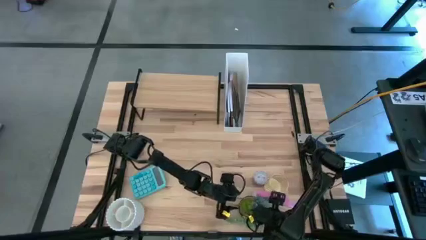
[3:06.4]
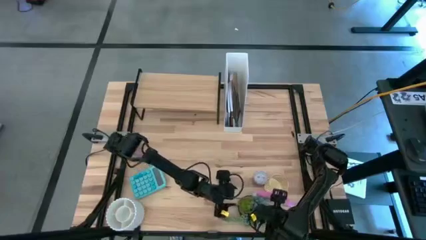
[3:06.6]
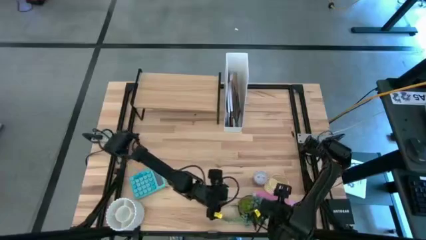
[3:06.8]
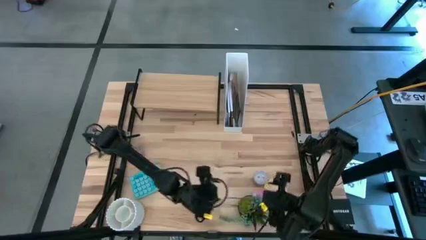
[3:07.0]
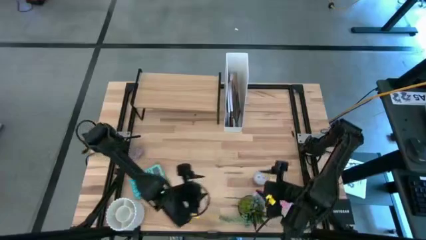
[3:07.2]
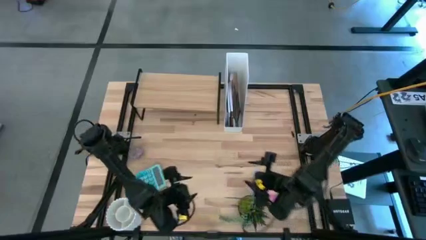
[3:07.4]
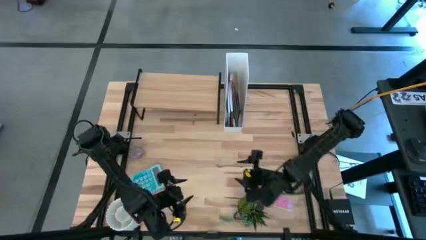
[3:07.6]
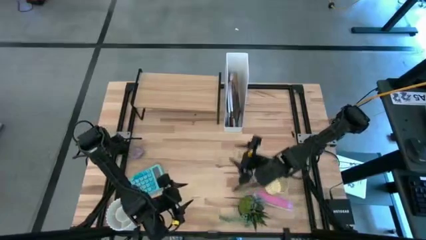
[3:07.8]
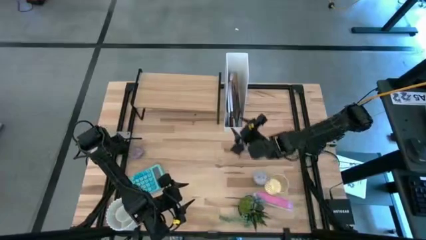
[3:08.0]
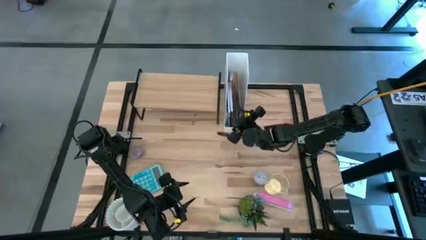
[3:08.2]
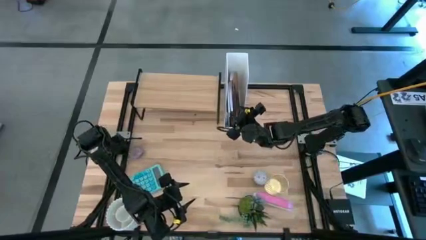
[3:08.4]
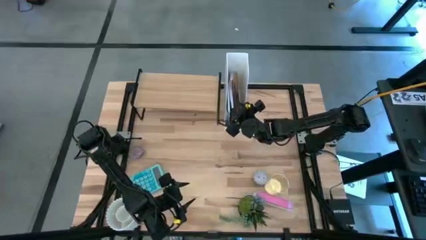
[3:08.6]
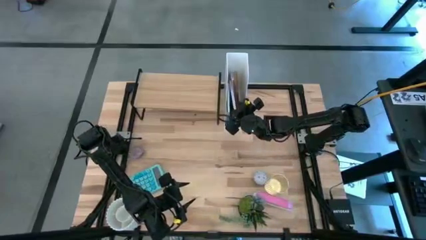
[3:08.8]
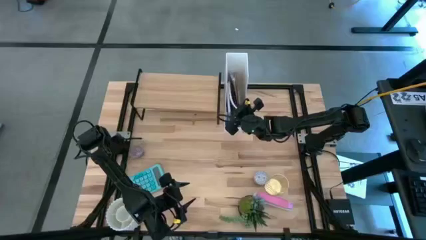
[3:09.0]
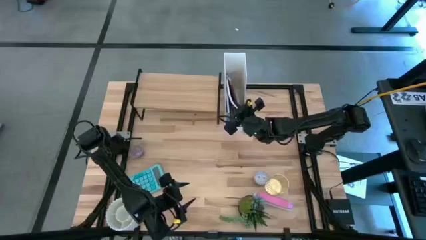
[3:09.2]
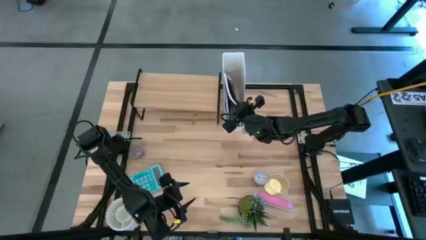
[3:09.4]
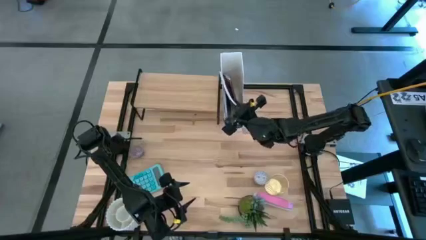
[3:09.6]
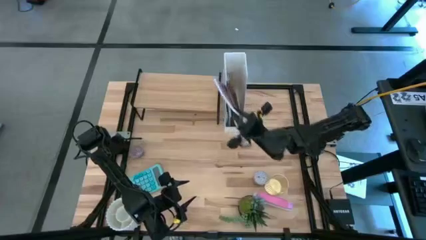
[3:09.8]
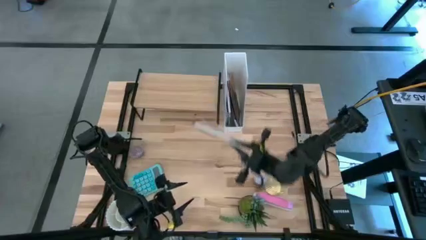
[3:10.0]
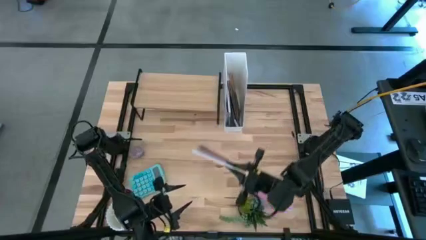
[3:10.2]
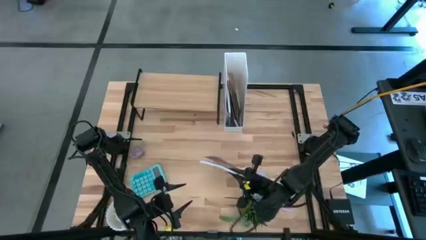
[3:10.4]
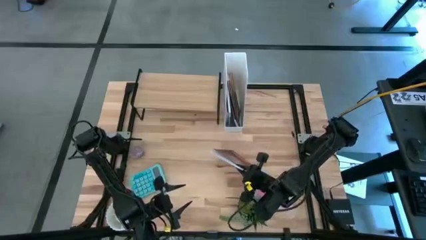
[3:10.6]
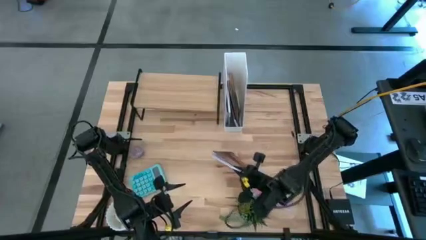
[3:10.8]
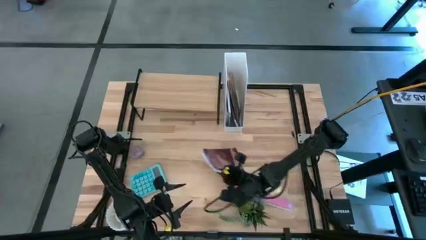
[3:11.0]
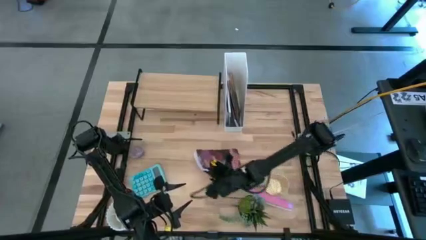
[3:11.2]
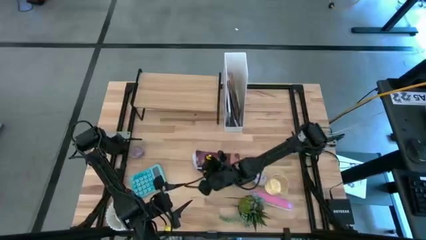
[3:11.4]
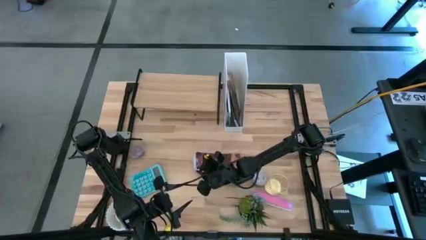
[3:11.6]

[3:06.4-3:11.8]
Task: Stock shelves
Remove the red book from the book organizer

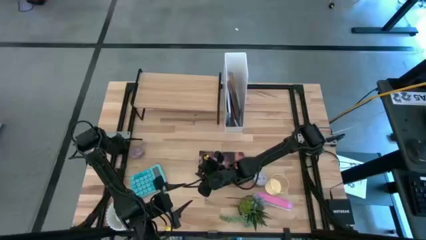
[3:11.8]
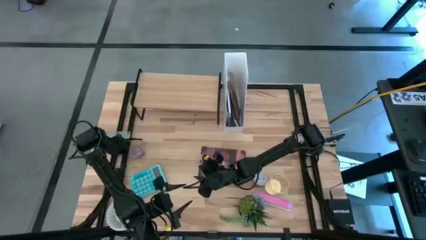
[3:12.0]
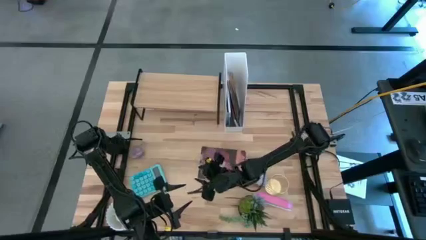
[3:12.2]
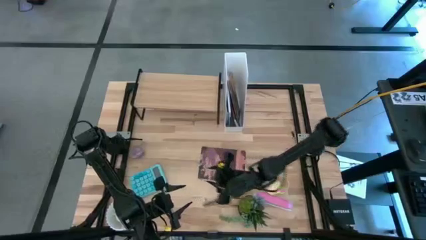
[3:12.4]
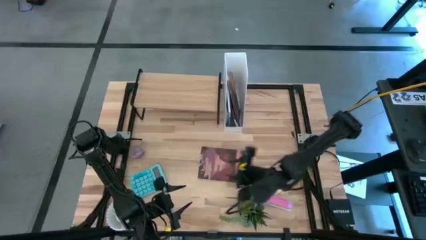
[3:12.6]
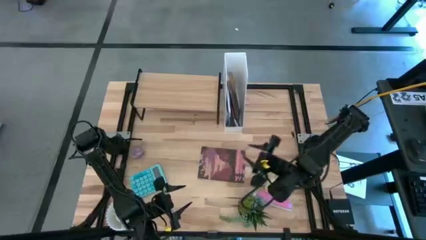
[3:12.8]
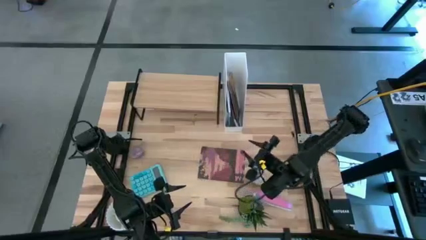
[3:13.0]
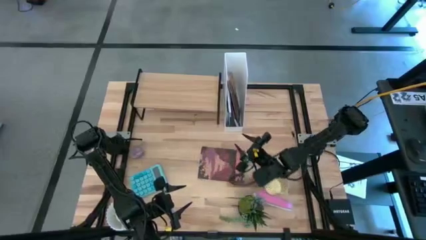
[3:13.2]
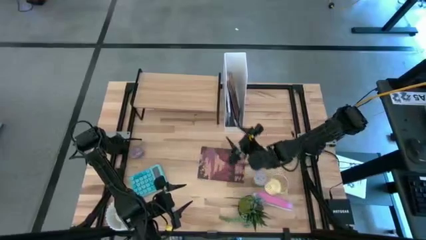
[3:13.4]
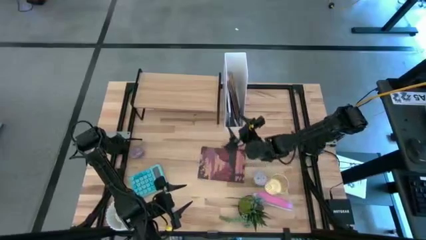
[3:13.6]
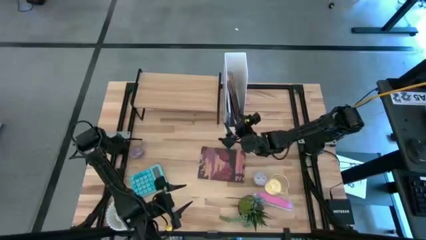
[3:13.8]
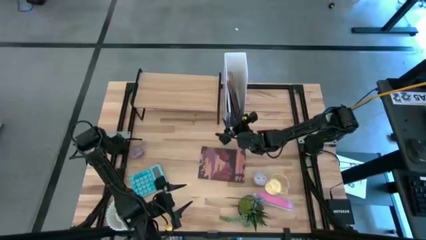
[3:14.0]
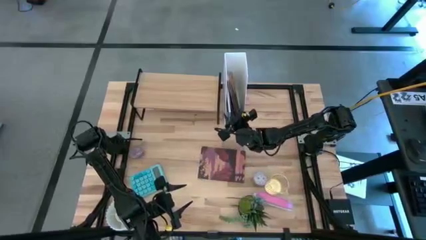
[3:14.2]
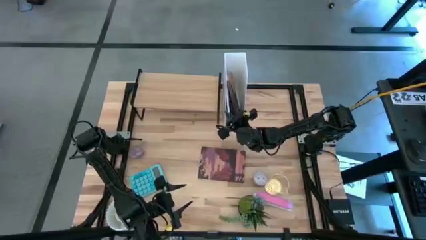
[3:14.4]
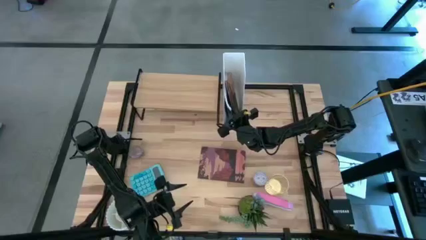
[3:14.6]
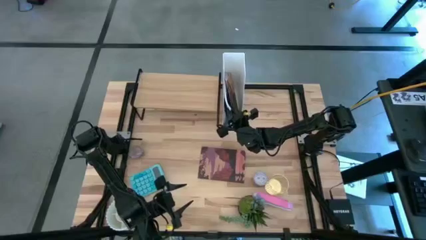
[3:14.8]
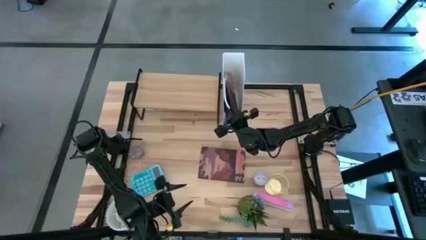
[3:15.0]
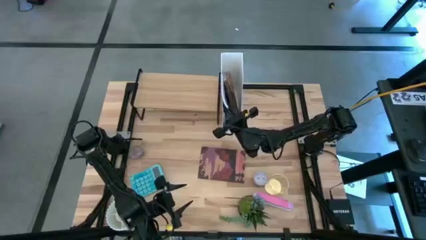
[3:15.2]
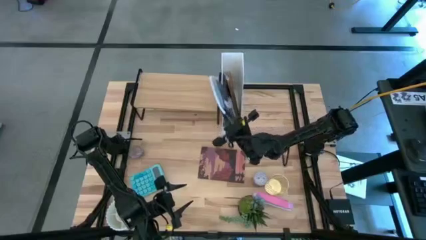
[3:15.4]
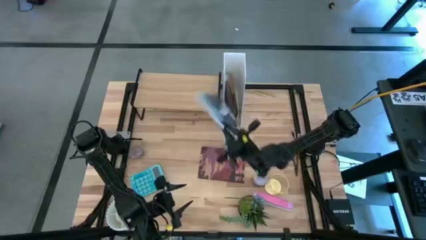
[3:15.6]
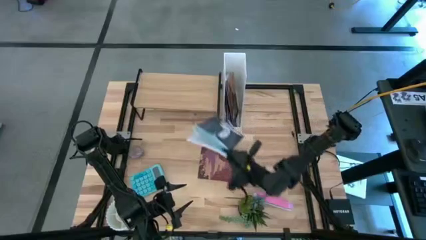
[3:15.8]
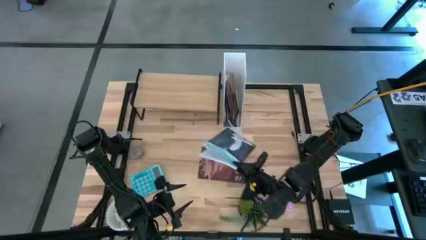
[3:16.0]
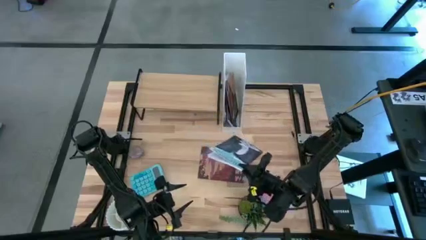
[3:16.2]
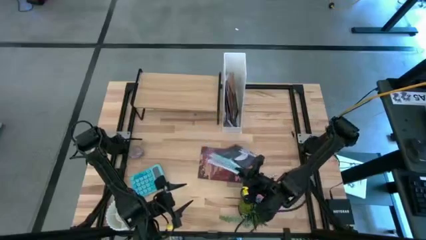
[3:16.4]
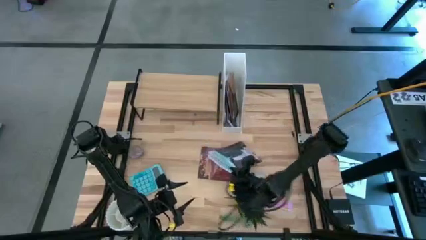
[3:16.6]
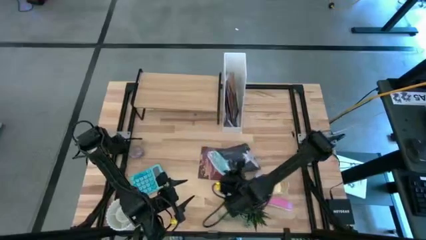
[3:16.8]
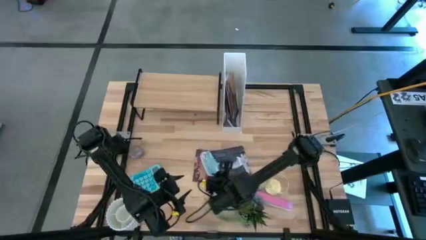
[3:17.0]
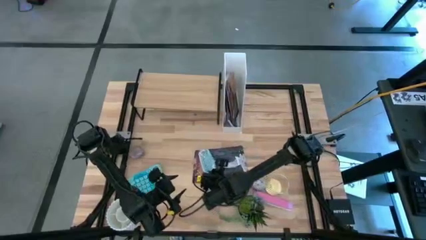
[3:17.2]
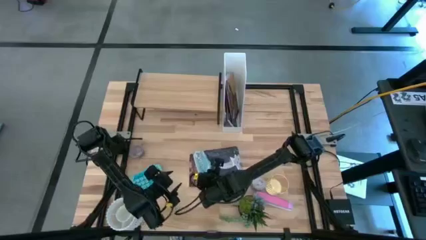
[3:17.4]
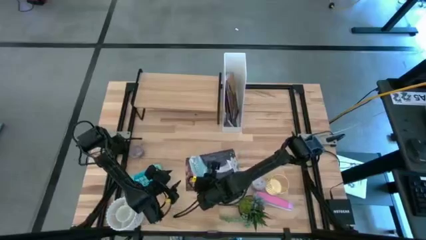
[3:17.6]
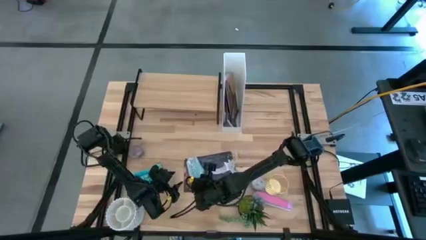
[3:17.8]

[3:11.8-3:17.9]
Remove the blue book from the book organizer

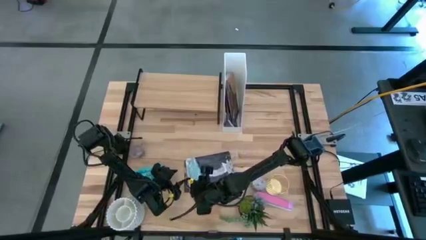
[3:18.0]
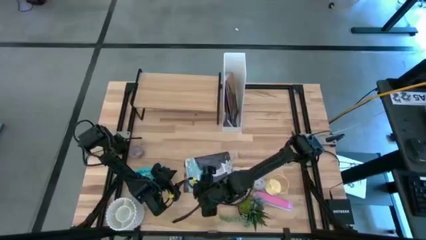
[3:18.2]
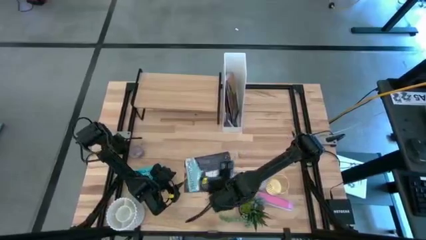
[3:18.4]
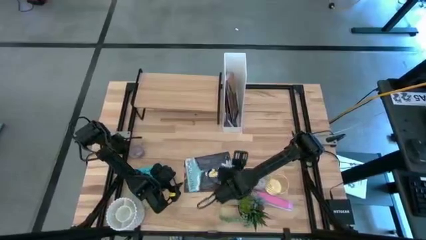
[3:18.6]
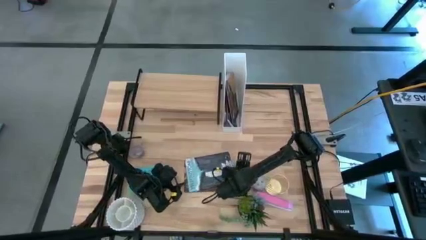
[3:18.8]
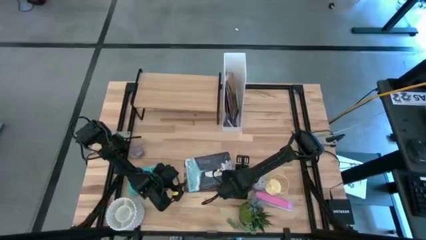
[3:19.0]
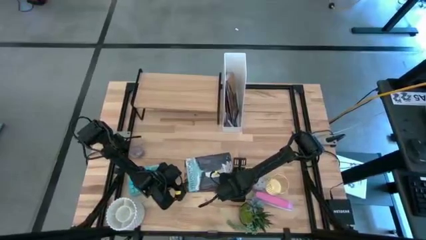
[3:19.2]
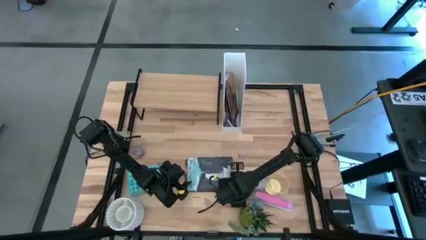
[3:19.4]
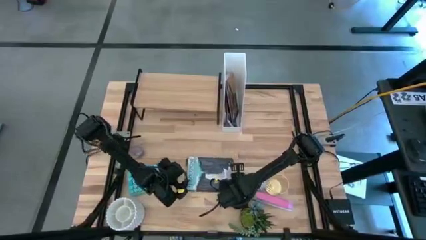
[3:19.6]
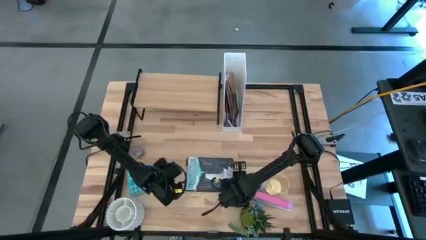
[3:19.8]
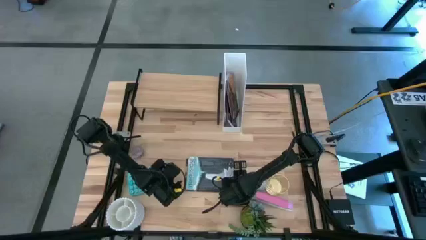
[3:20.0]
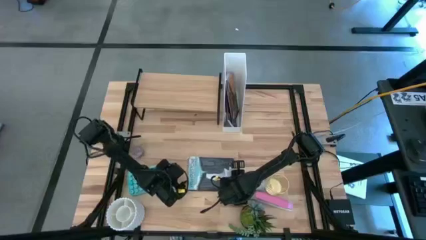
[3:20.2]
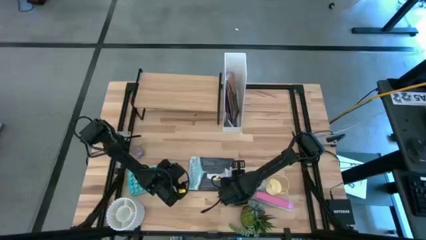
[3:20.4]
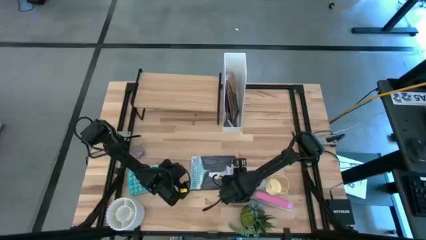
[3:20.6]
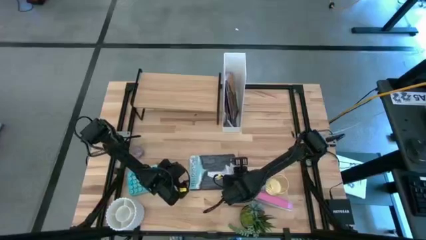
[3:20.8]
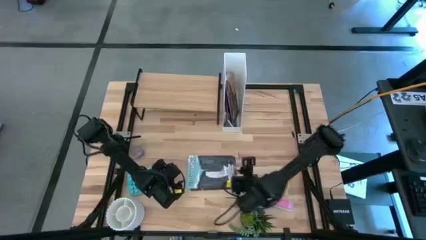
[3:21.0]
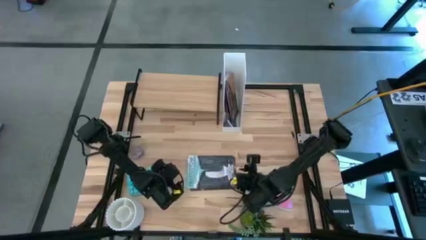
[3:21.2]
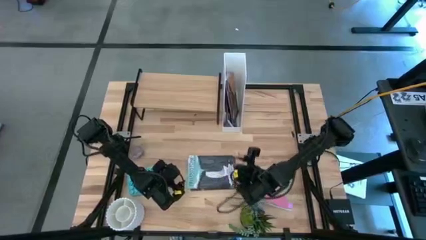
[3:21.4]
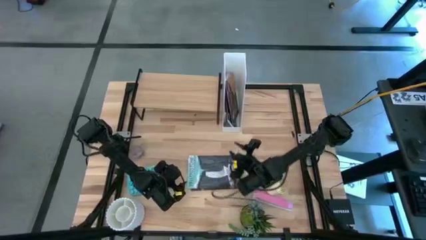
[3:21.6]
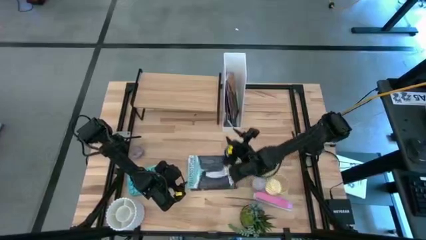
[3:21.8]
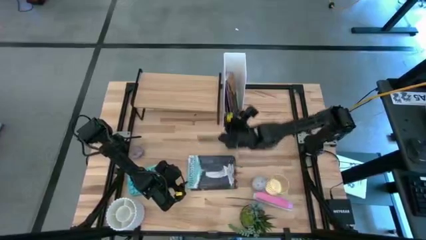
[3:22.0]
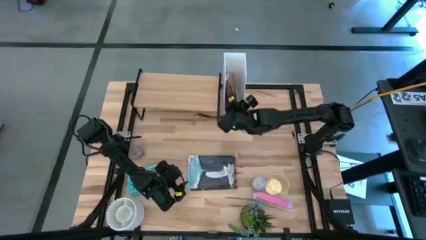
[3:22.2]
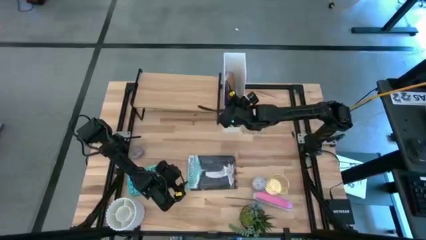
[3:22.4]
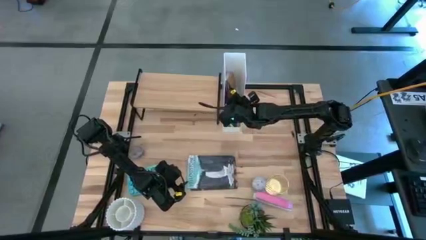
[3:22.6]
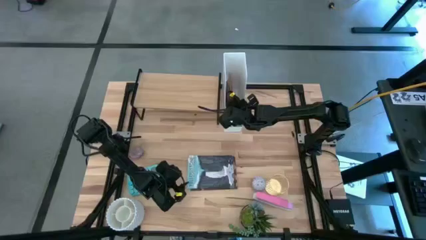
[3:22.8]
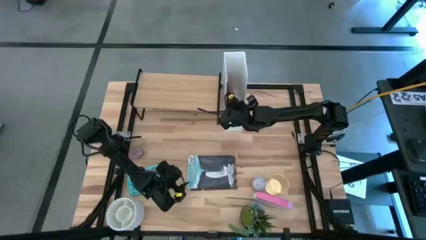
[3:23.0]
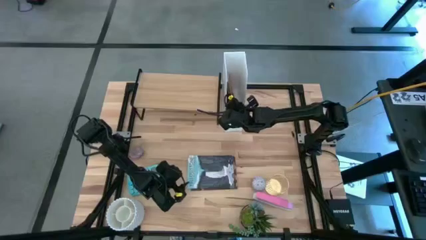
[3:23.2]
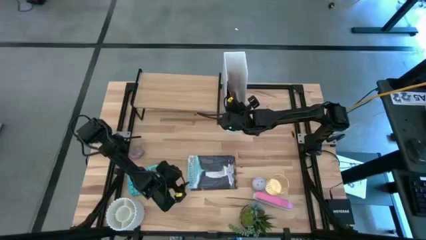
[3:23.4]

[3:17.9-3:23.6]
Remove the brown book from the book organizer

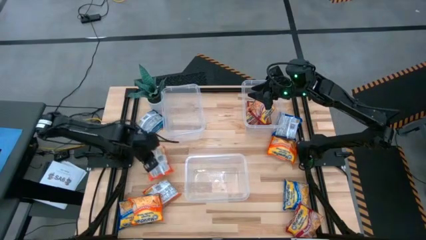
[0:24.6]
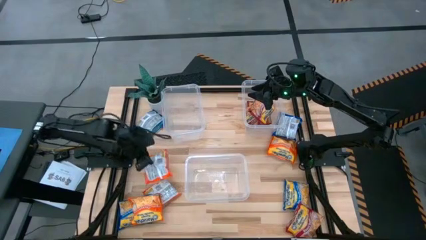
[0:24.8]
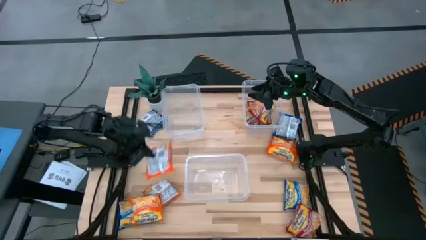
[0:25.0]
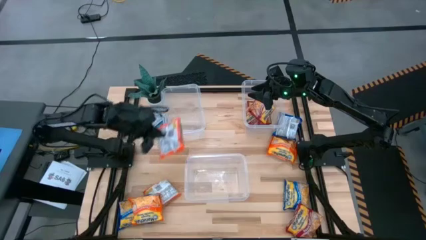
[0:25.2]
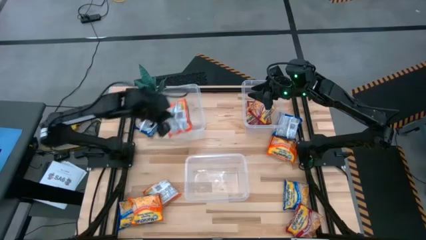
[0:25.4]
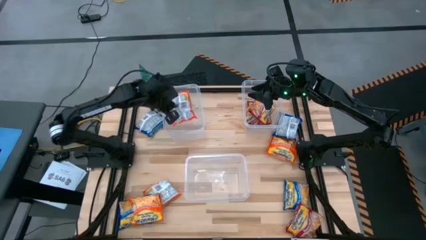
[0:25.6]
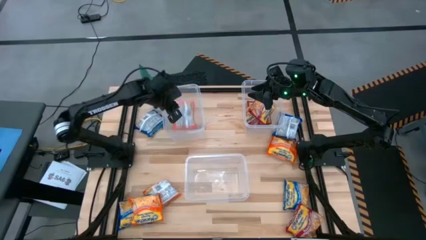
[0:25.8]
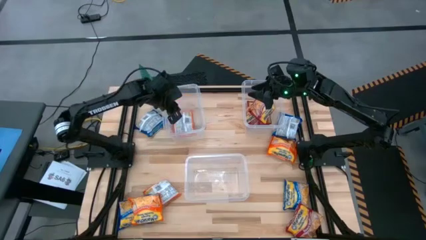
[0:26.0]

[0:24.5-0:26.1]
Task: Sort Maruchan noodles
Put the middle left orange bag into the top left transparent bin
